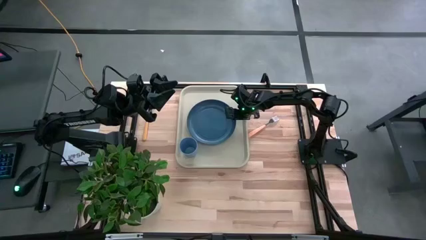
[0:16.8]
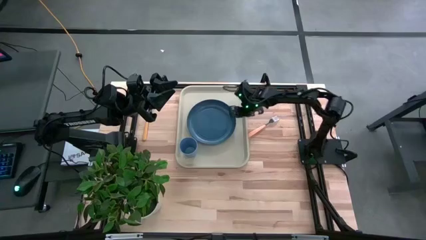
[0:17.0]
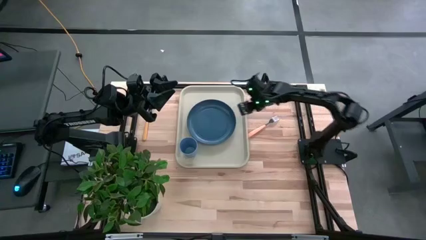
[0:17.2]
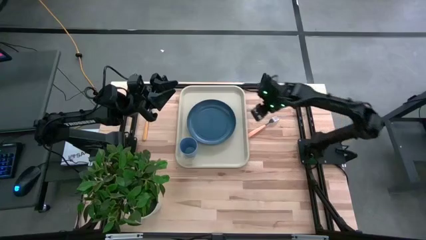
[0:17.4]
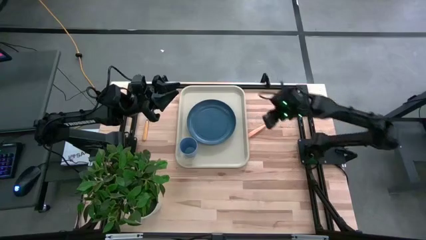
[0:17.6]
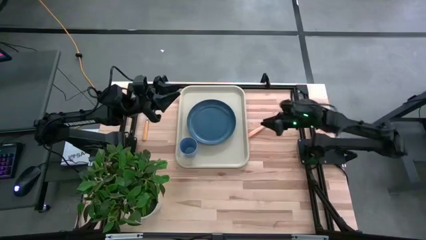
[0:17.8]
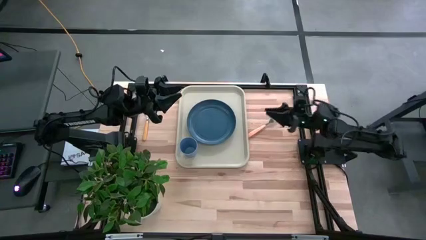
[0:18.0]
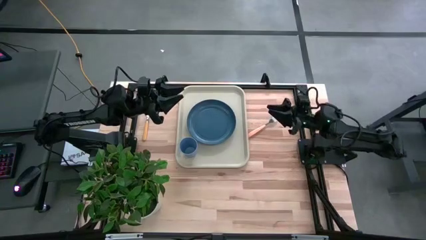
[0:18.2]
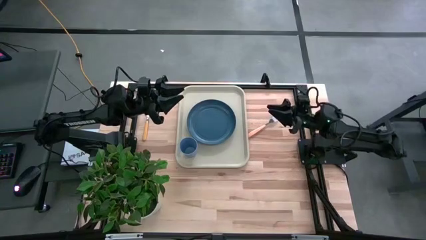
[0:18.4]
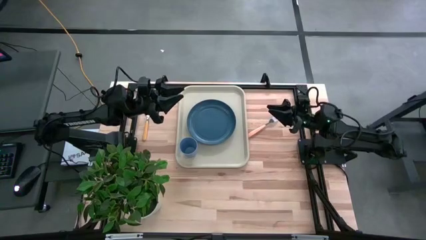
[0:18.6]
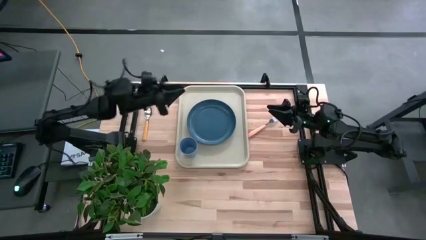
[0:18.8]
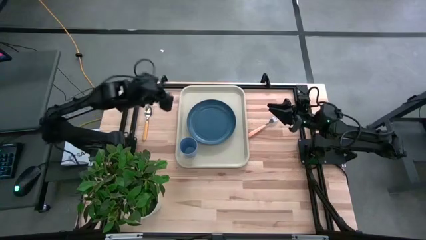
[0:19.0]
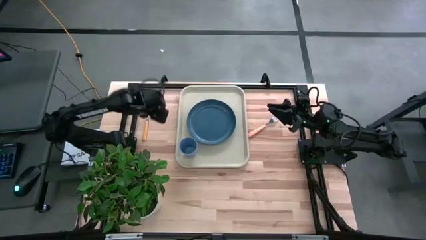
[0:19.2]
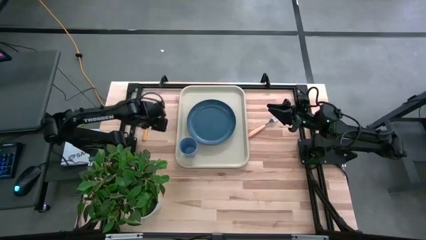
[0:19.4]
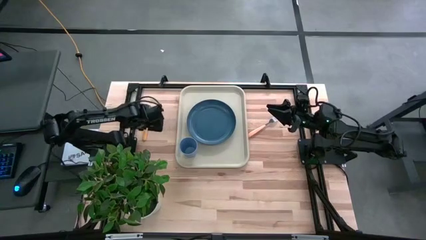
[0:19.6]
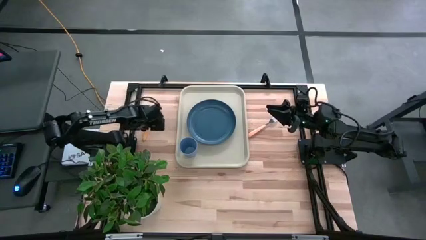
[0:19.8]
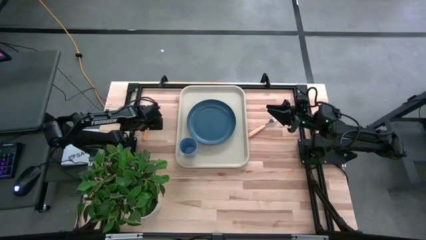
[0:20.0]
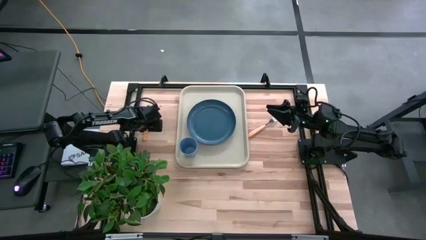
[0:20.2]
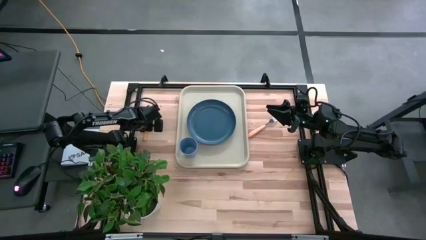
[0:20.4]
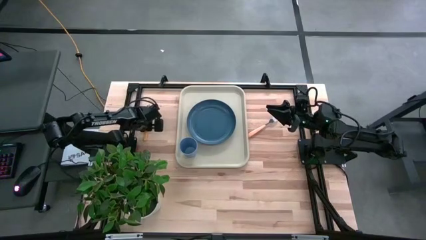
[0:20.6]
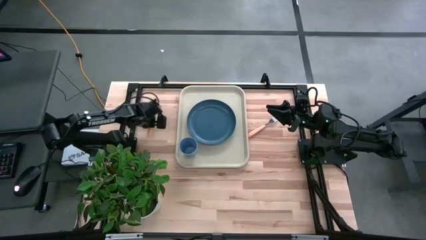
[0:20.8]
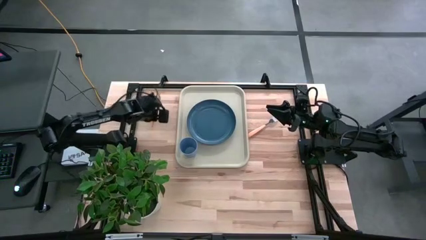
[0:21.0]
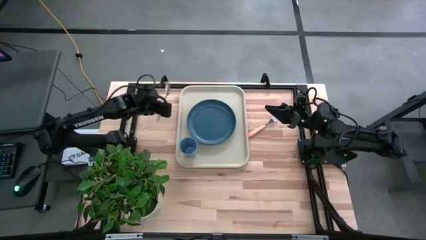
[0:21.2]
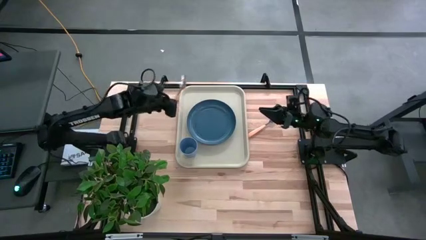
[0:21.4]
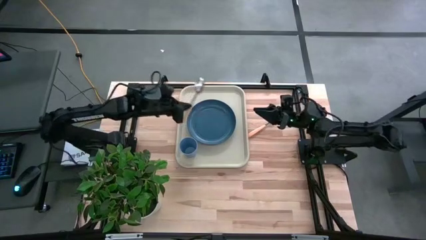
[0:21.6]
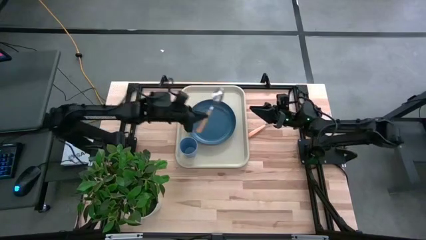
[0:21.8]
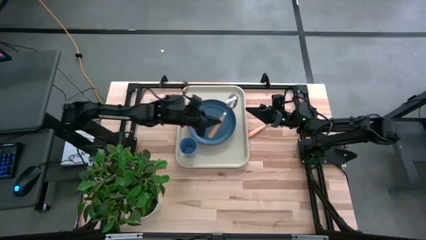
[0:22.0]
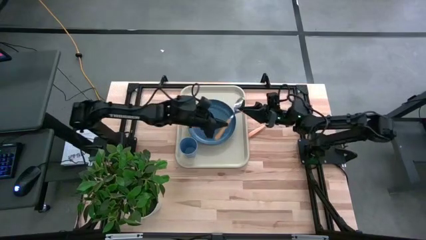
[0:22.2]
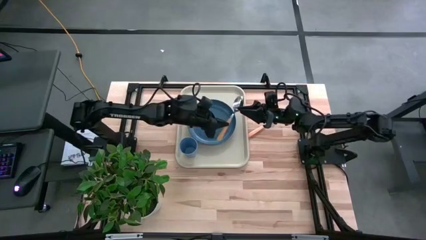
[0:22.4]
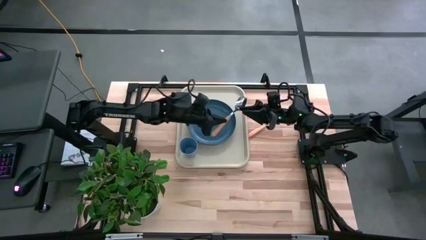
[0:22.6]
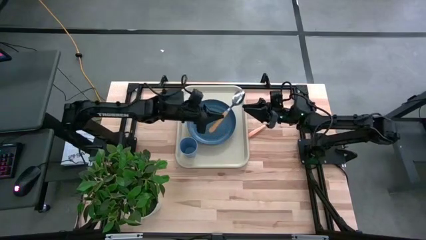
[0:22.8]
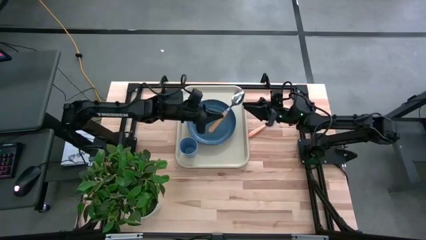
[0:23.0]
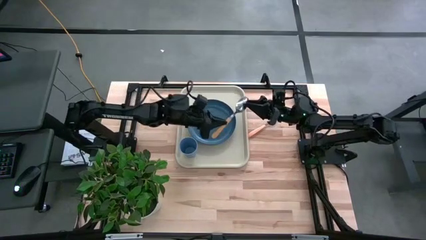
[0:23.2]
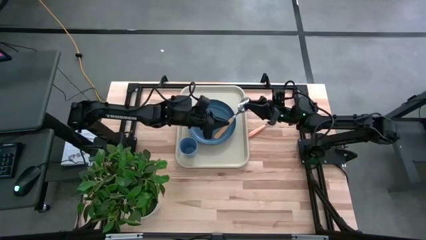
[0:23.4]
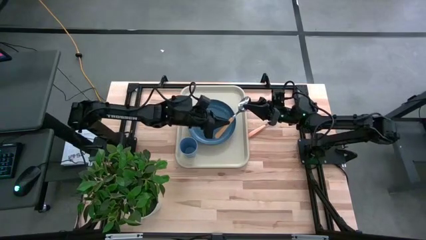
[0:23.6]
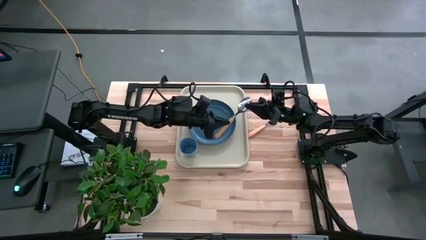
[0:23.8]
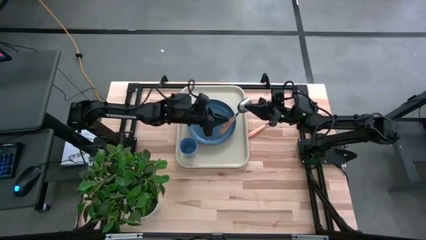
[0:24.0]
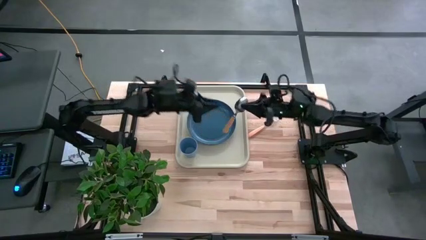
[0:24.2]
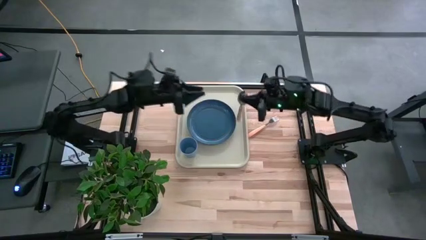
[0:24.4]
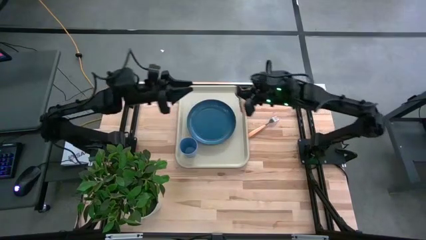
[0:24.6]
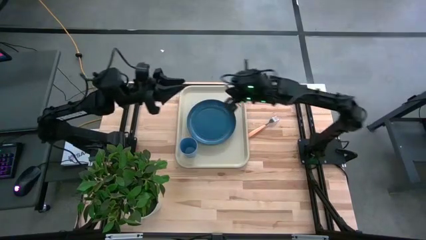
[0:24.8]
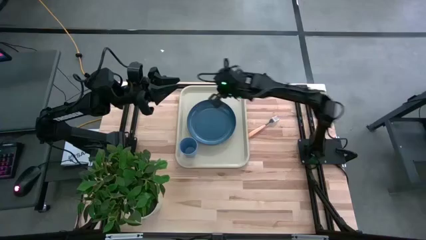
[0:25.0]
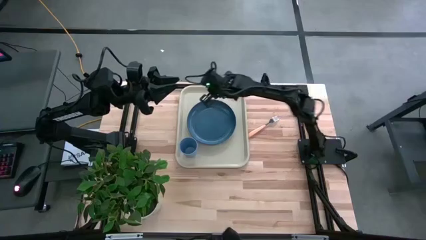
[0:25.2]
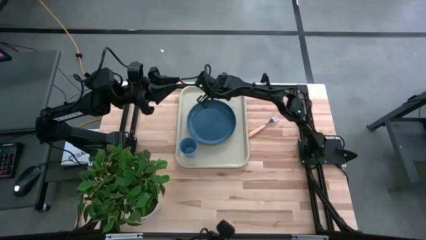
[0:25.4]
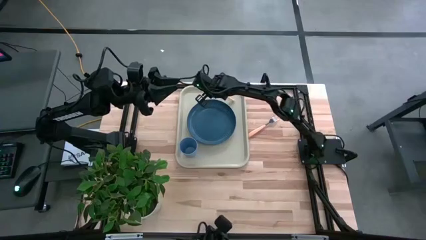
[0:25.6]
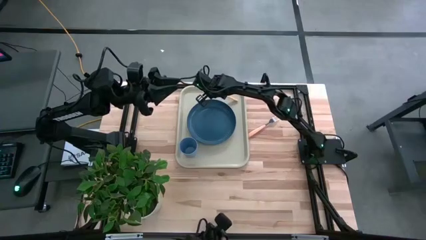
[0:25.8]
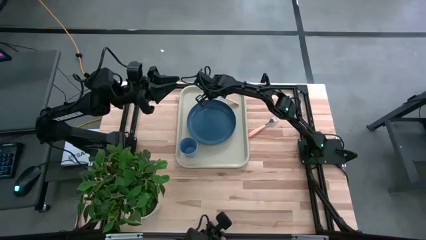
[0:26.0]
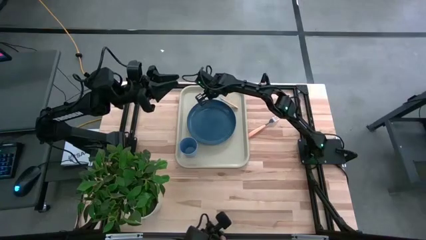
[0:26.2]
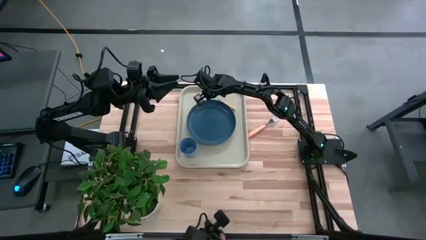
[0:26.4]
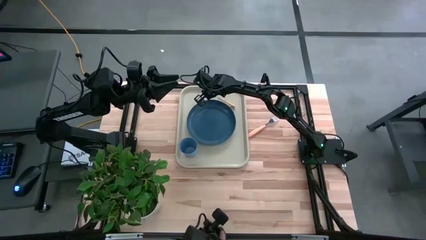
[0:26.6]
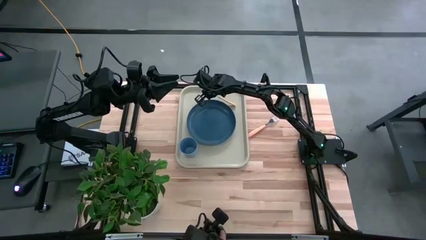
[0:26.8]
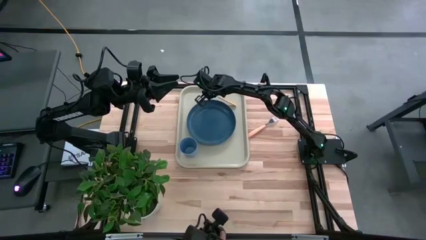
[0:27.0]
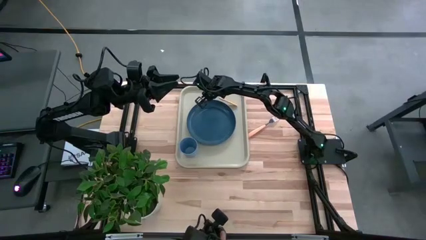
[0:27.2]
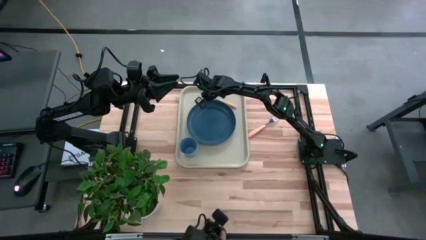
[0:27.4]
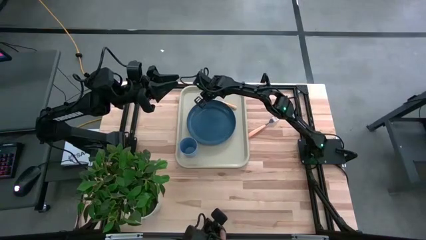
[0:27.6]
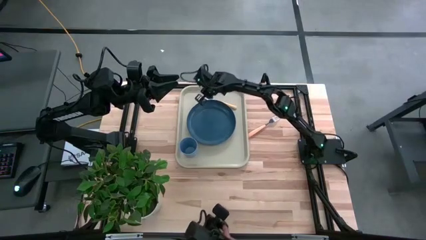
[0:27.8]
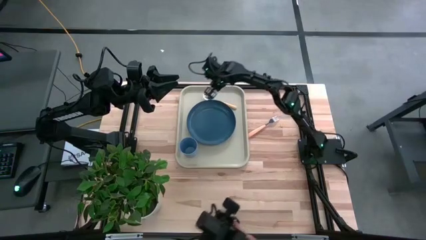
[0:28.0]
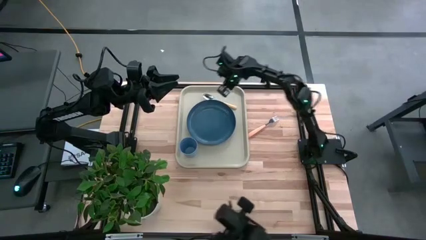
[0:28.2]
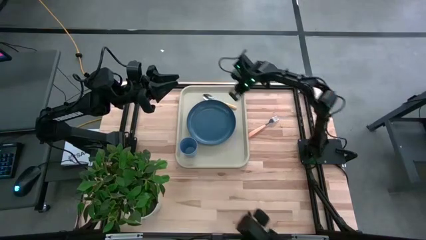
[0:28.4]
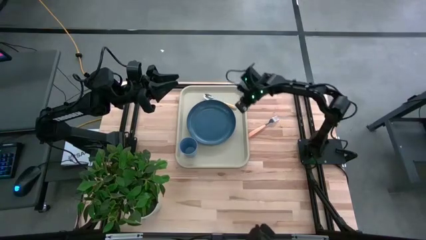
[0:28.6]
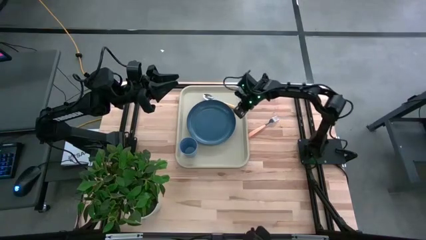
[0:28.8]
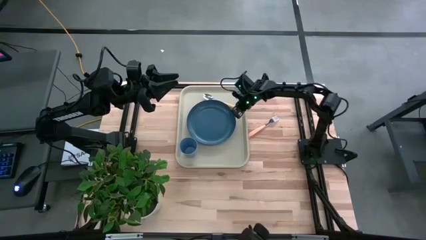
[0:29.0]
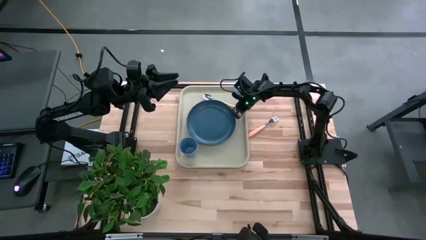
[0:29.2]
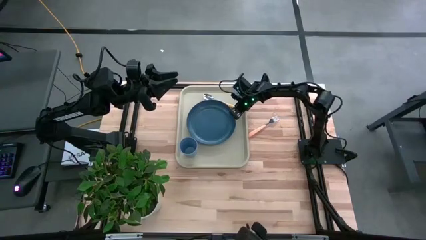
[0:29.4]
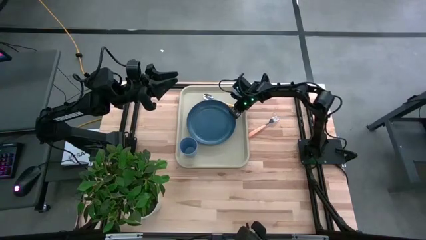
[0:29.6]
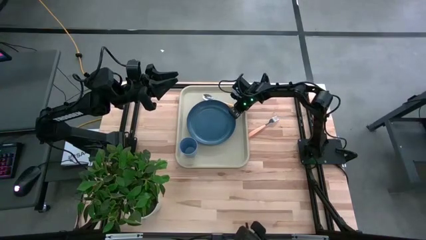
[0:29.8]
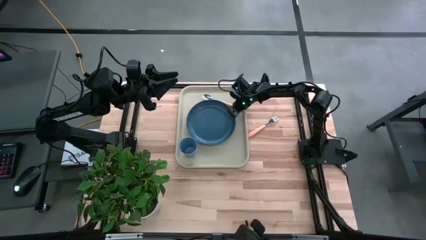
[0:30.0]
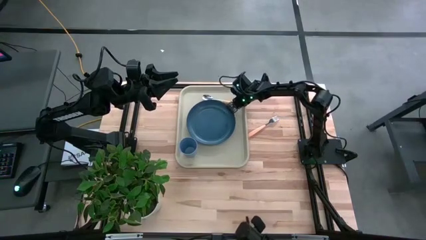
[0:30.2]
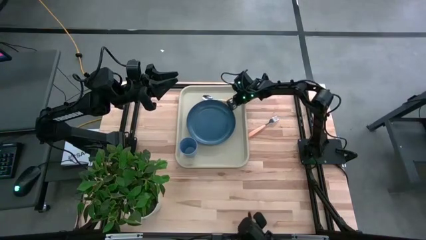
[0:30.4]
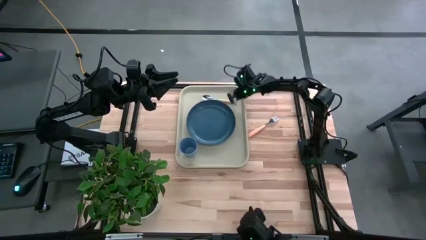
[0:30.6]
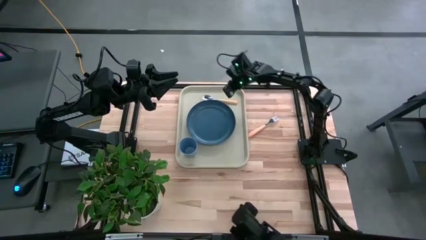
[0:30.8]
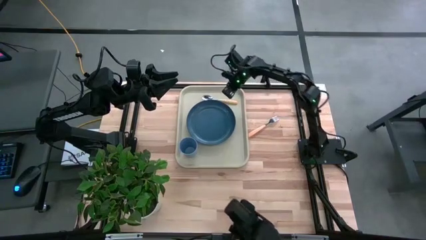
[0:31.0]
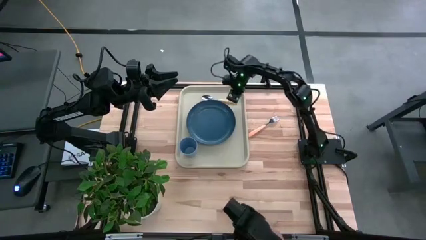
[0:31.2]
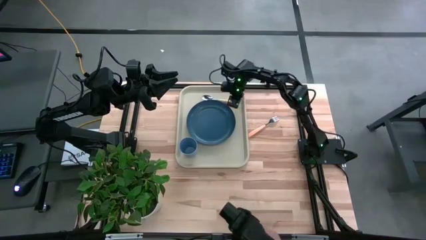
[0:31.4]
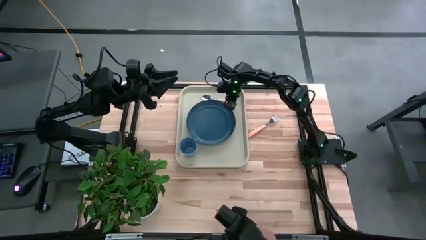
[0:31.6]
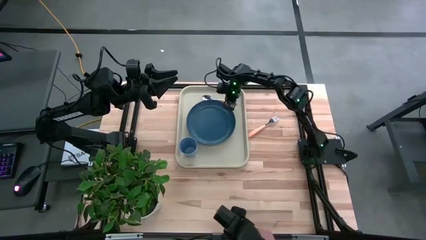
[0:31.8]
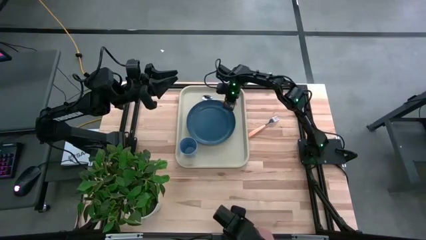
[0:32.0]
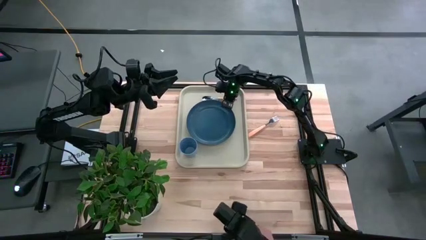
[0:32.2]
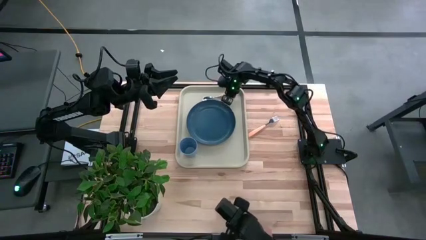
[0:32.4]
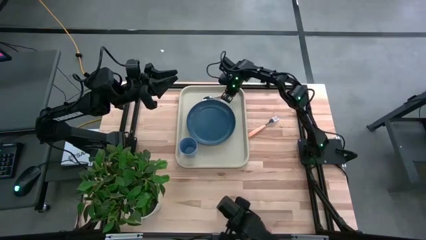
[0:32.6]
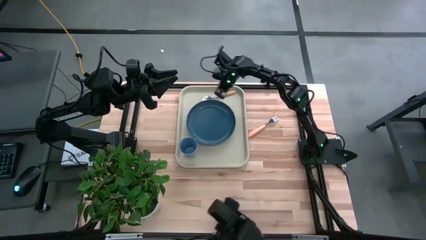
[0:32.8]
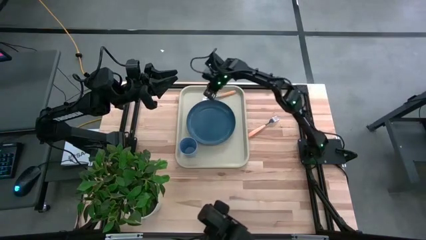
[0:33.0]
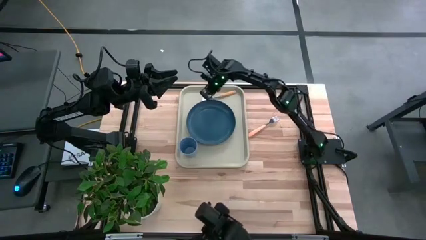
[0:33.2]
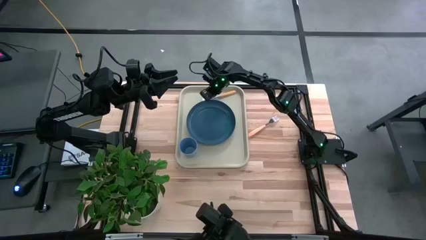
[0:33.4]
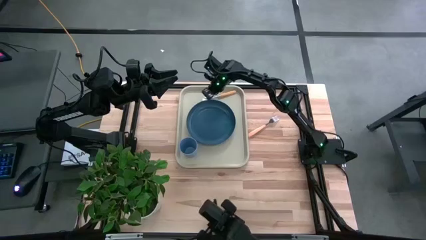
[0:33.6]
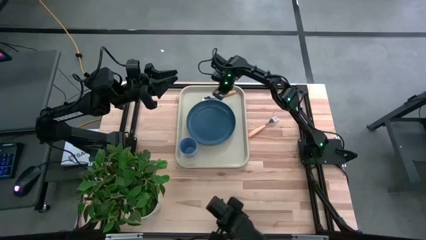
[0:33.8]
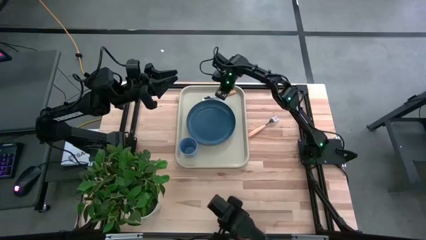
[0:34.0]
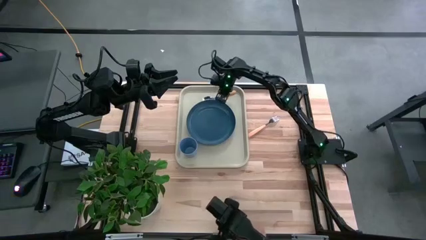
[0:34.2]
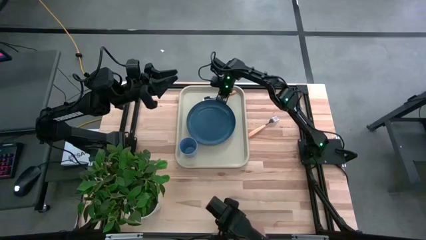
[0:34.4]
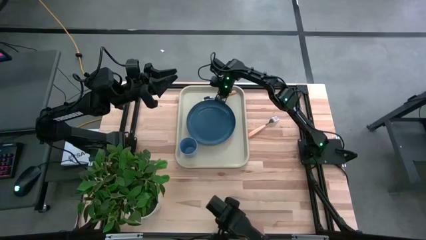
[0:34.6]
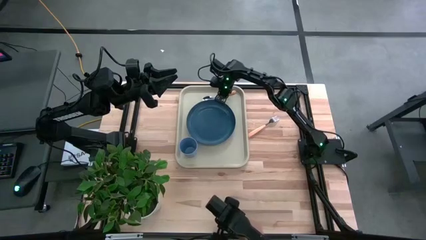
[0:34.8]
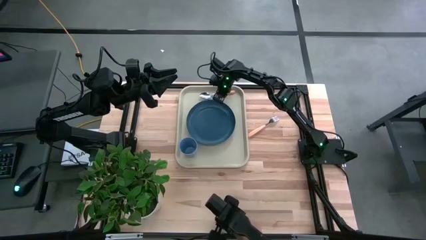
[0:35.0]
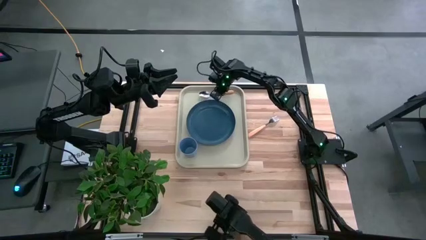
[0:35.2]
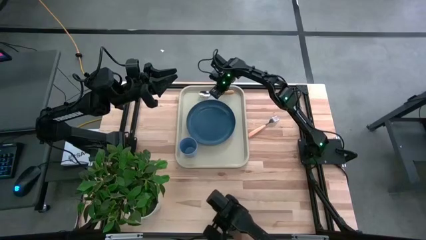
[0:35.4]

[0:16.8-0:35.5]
Task: Pick and place plate/cup/fork/spoon on tray
Put the brown spoon on the white tray to the top of the blue plate
